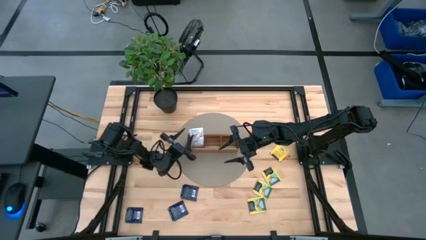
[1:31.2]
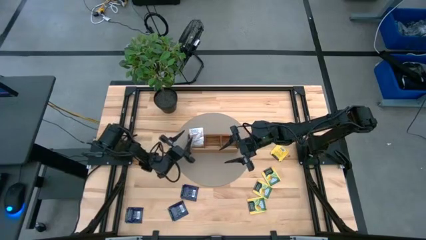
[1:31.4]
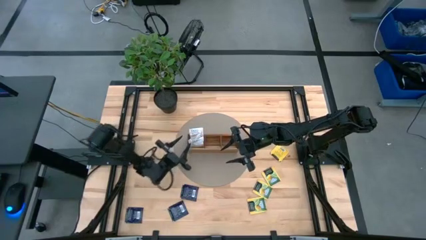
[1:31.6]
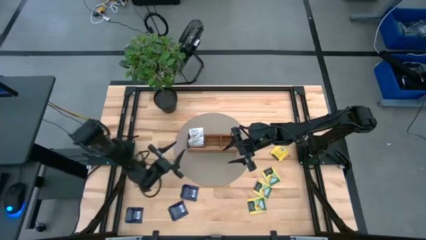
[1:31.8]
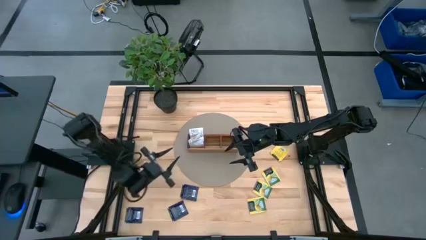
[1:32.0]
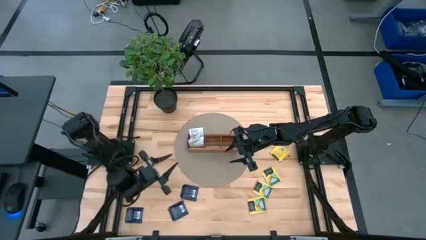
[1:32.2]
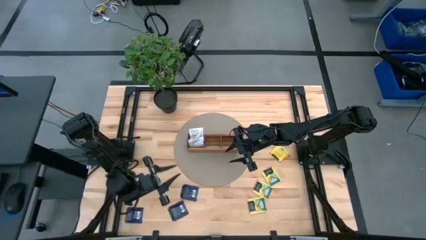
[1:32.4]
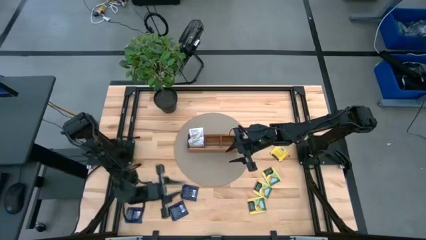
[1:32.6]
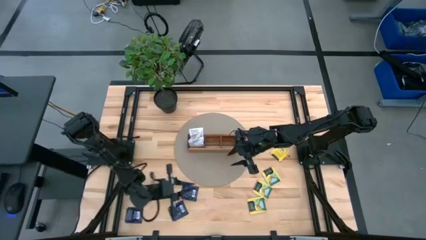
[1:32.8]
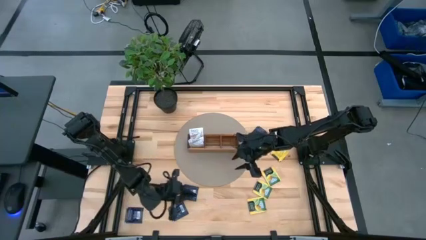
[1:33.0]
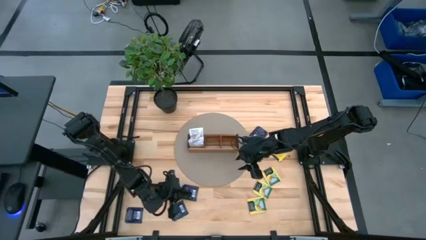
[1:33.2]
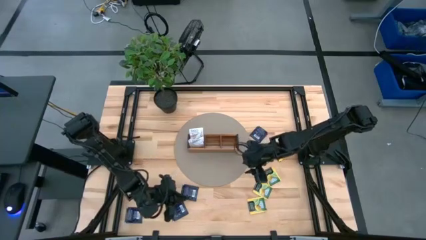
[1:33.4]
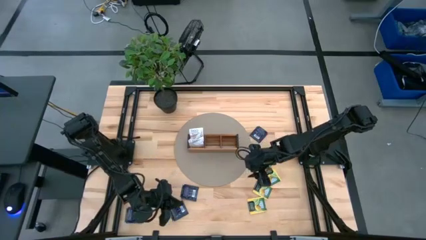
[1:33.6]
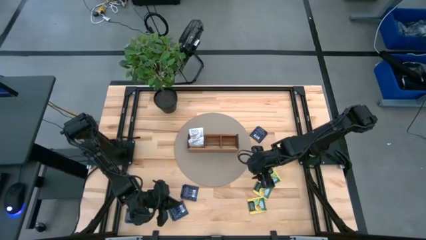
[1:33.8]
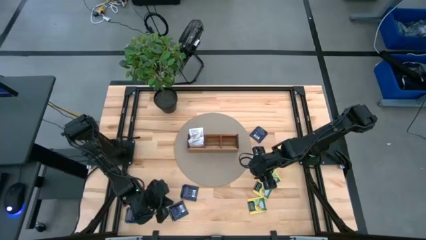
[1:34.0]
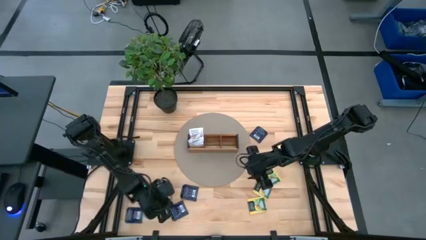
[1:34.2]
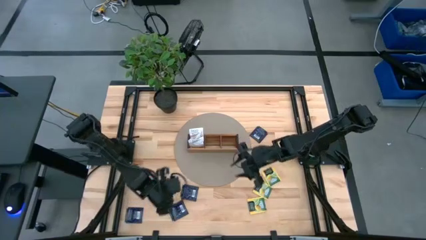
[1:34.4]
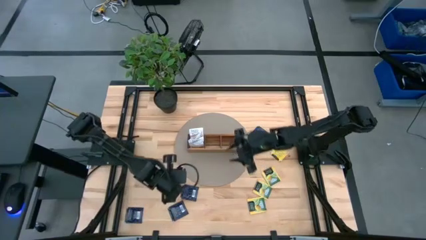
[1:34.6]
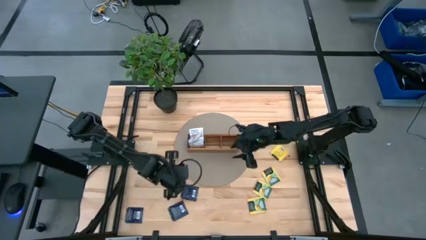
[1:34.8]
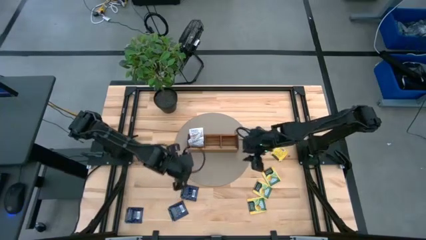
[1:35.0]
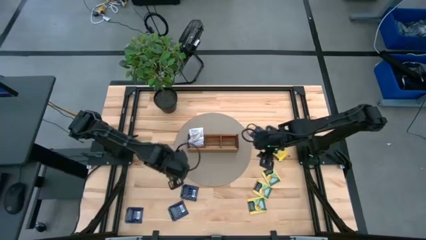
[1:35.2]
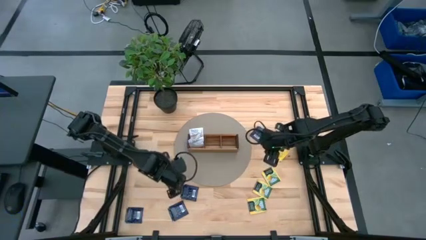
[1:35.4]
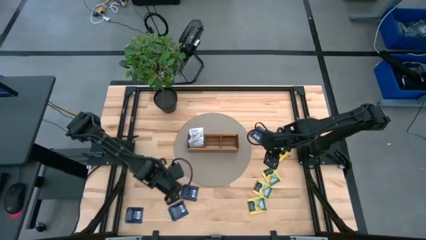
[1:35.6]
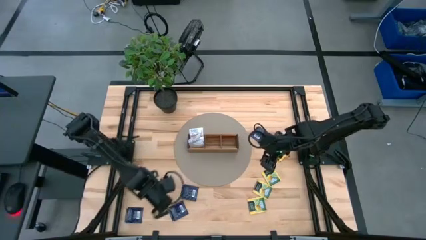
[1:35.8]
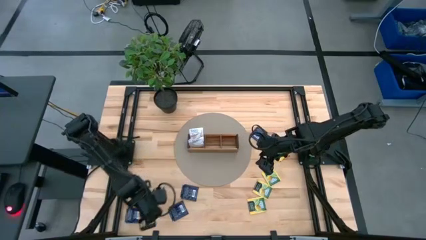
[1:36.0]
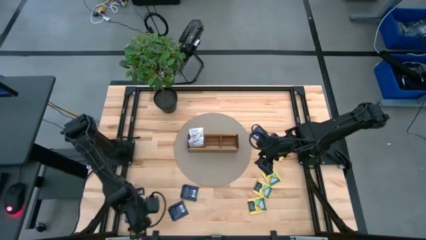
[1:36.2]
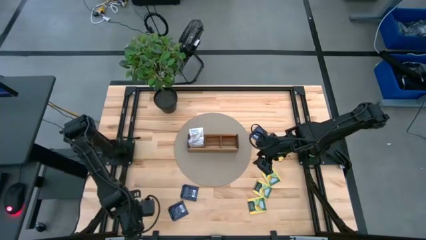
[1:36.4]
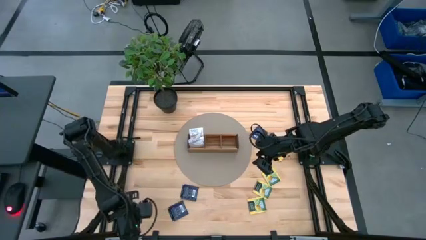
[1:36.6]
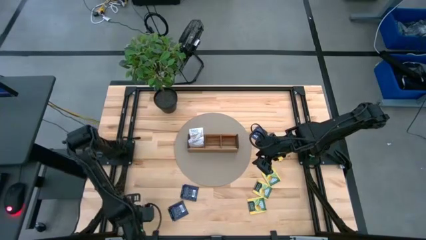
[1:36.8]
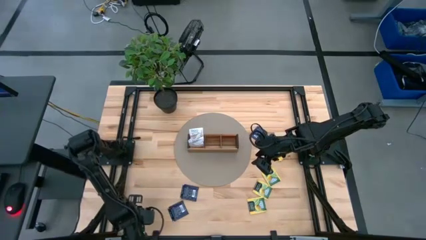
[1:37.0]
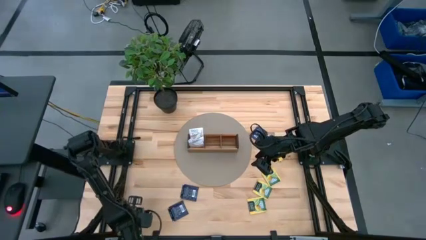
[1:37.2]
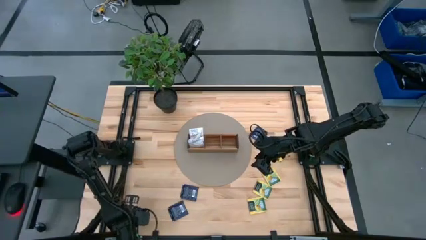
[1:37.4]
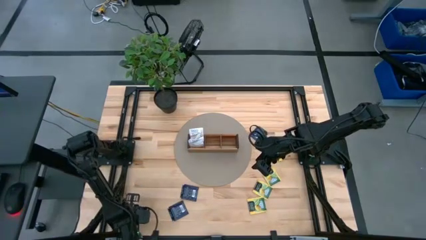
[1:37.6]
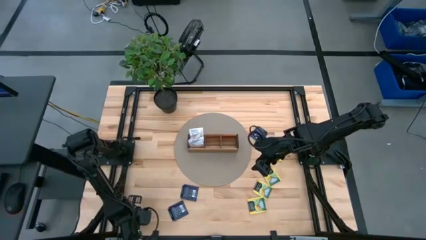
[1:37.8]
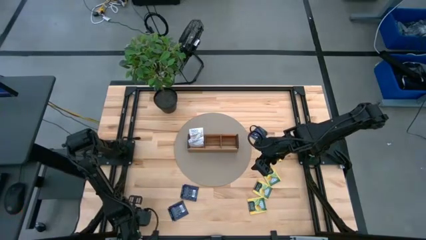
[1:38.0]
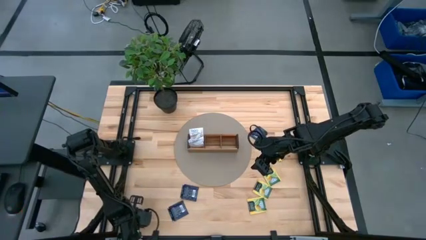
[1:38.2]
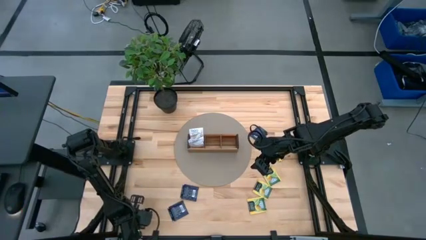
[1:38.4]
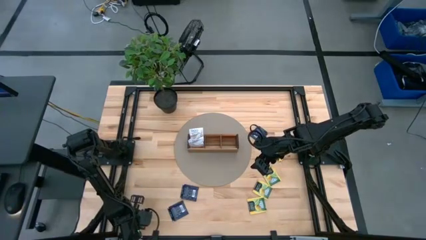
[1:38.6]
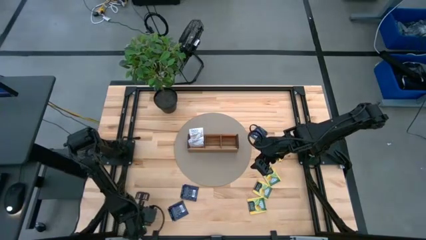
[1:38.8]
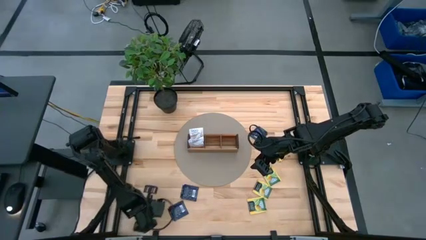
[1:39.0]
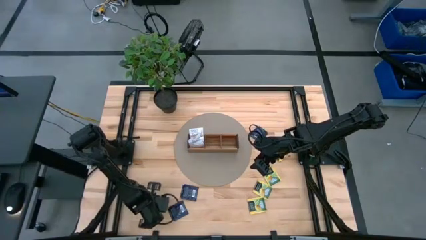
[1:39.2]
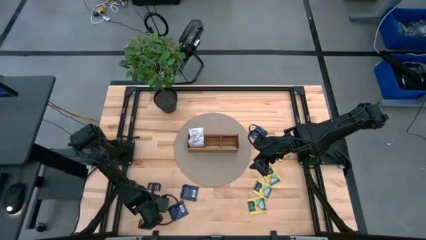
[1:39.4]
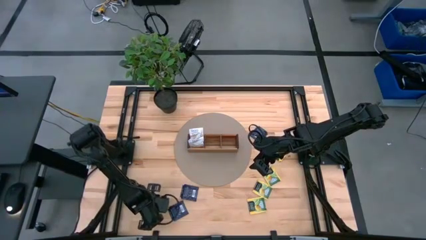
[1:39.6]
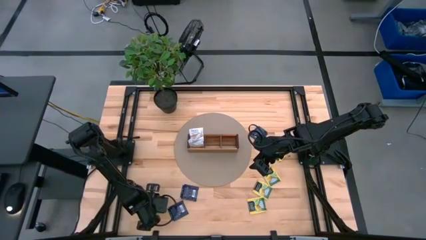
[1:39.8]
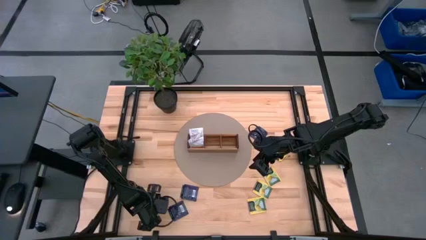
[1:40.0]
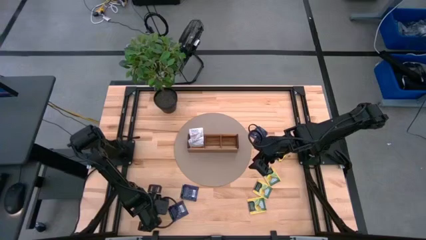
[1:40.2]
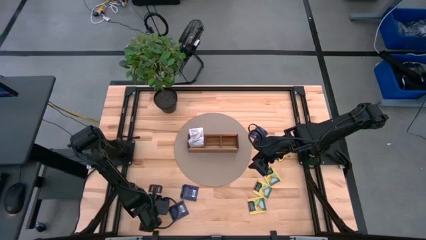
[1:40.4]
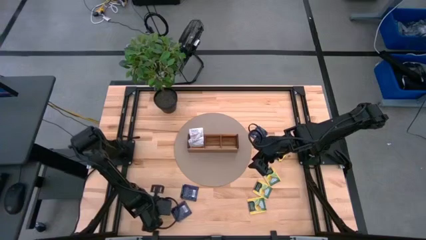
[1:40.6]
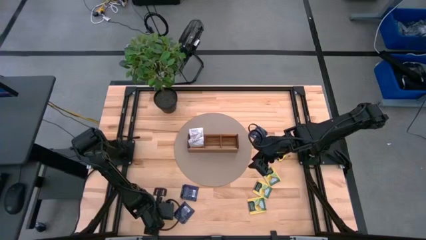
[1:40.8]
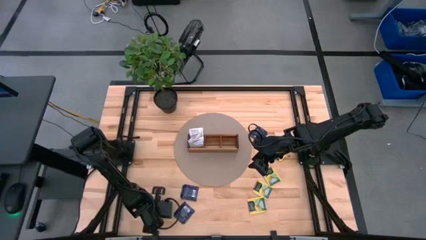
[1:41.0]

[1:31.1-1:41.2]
Task: Pick & Place Tea
Put the blue tea bag into the middle section of the wooden organizer

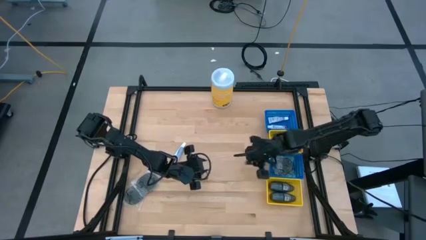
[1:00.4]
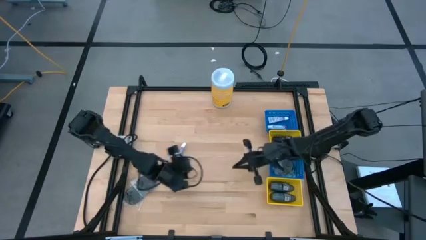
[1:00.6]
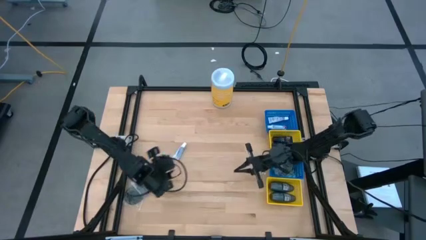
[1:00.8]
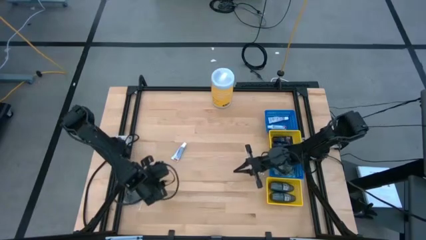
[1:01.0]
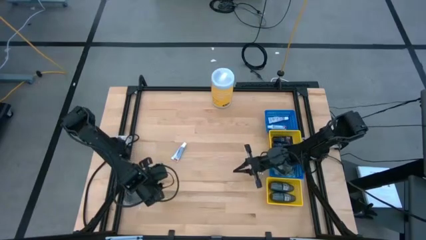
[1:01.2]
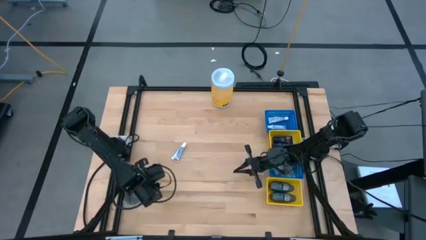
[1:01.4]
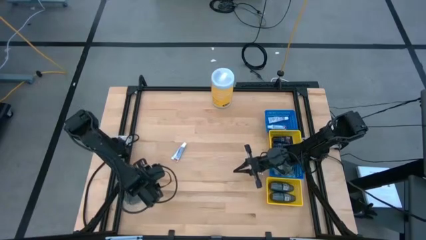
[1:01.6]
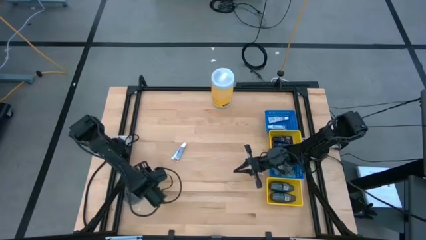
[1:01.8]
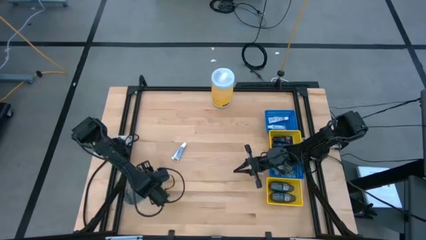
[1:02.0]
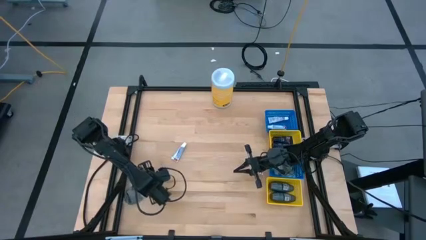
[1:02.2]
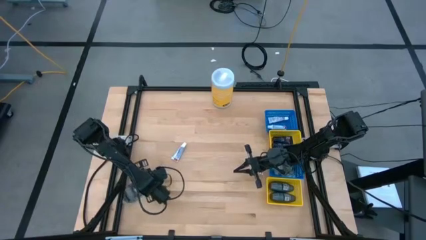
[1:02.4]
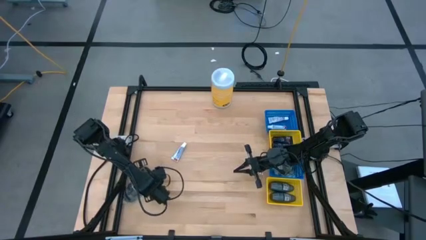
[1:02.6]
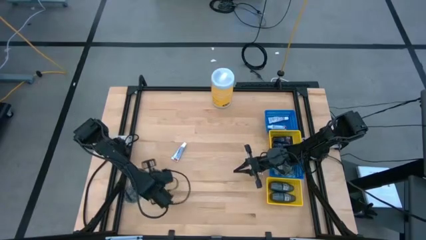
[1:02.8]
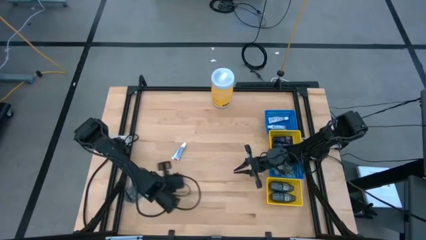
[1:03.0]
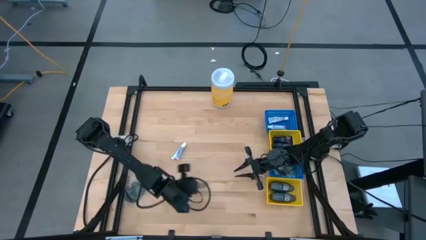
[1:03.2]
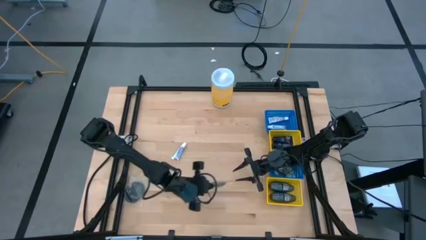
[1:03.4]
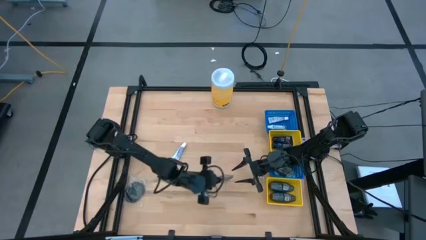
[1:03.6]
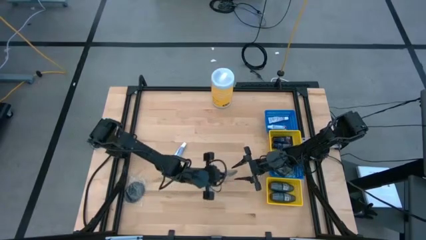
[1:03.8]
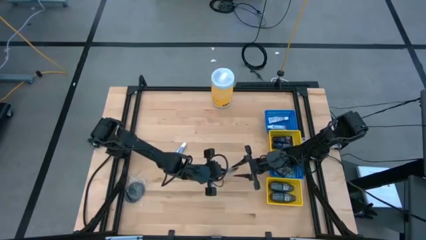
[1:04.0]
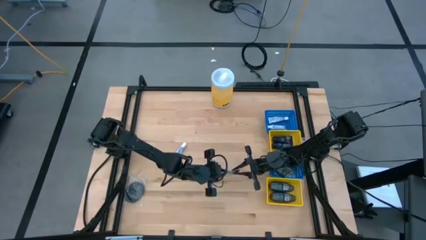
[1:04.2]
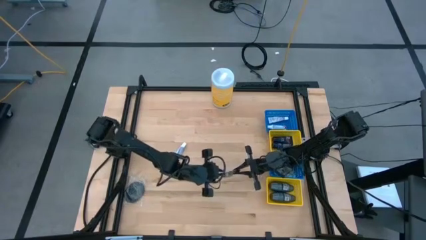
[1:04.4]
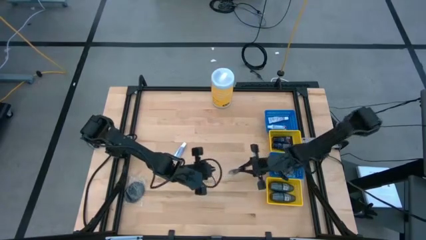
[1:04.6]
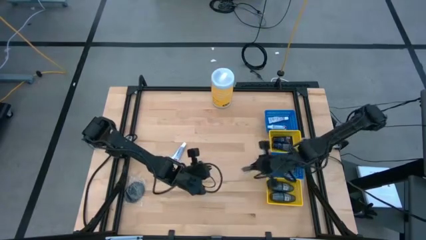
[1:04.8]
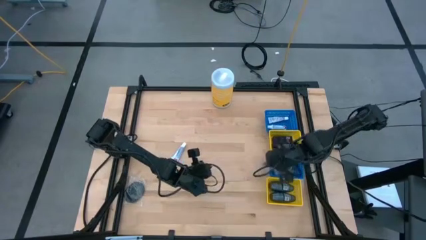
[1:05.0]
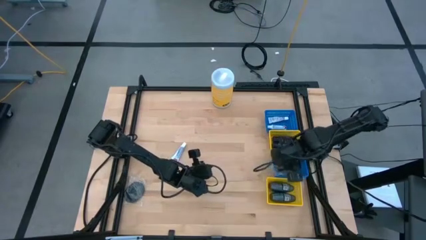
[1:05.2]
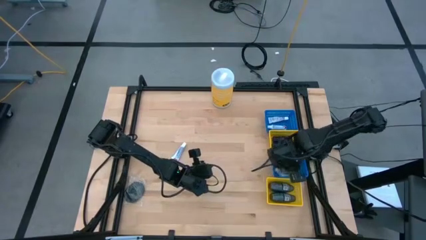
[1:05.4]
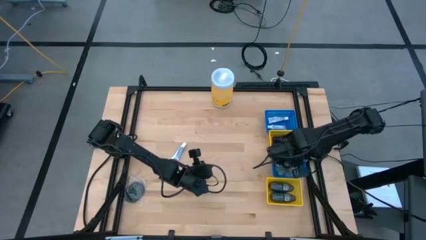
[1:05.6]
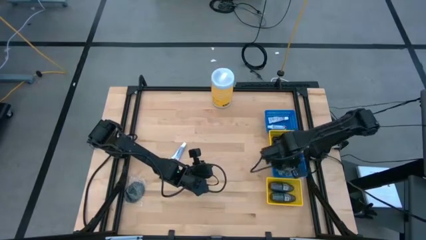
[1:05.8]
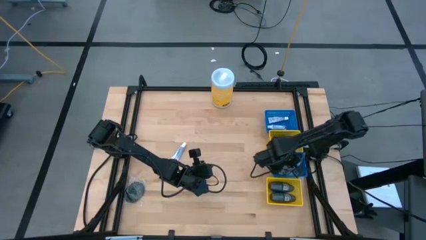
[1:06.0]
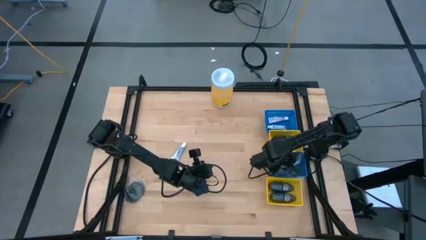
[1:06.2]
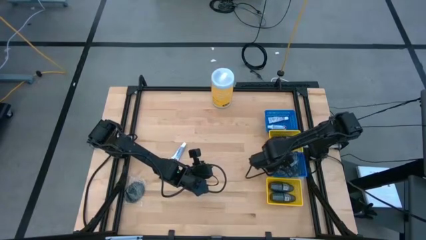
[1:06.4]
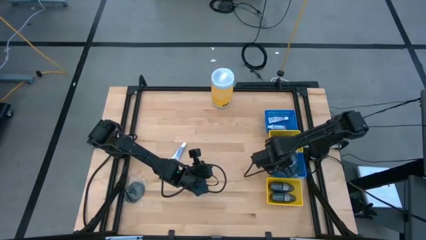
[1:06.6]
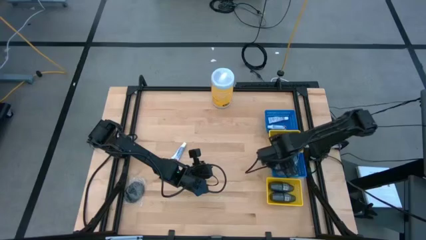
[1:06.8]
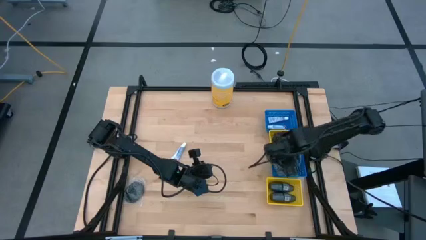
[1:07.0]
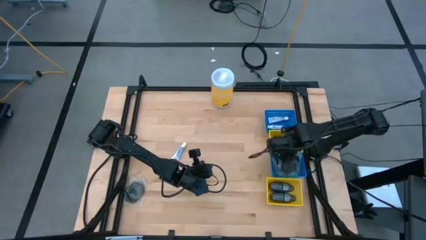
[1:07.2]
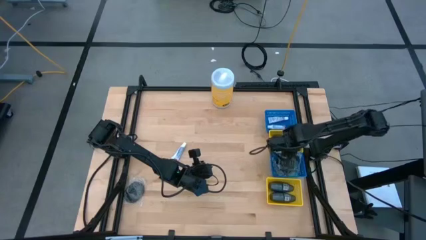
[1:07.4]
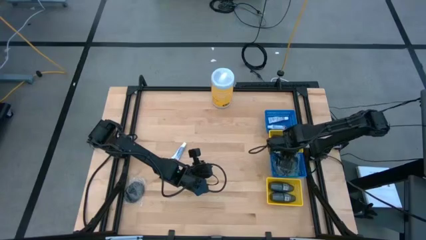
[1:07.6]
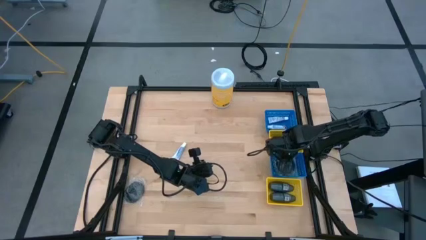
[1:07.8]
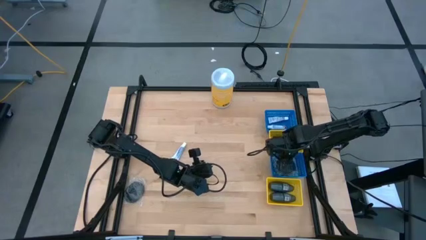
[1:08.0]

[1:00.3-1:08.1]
Task: Pick & Place Travel size toiletries
Put the black hairbrush into the bottom blue bin
